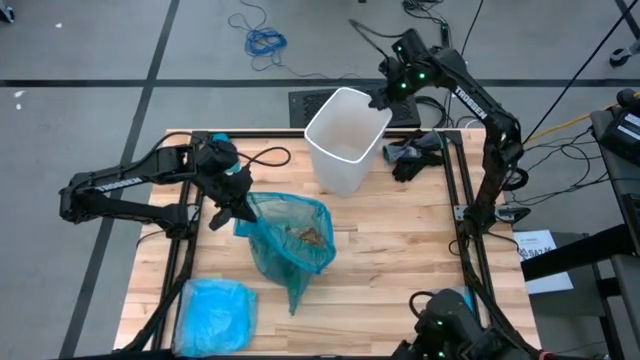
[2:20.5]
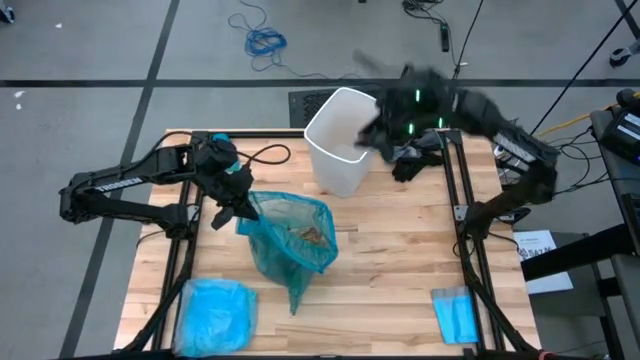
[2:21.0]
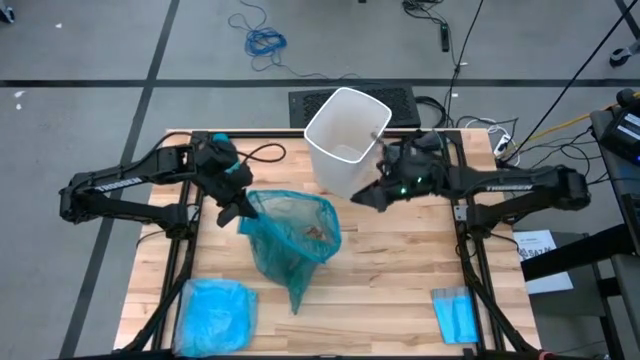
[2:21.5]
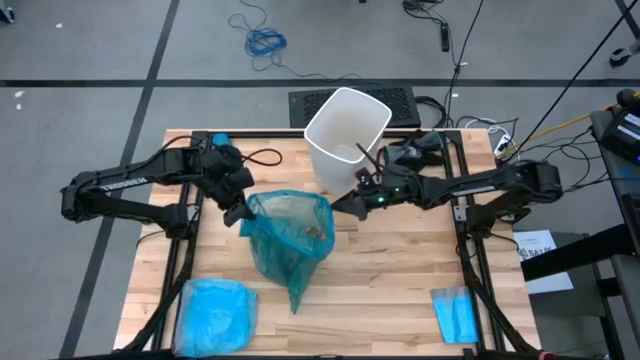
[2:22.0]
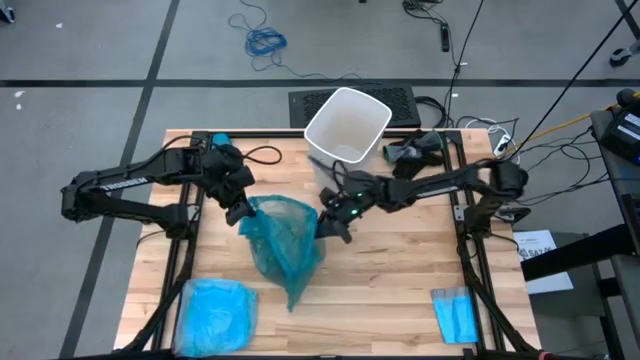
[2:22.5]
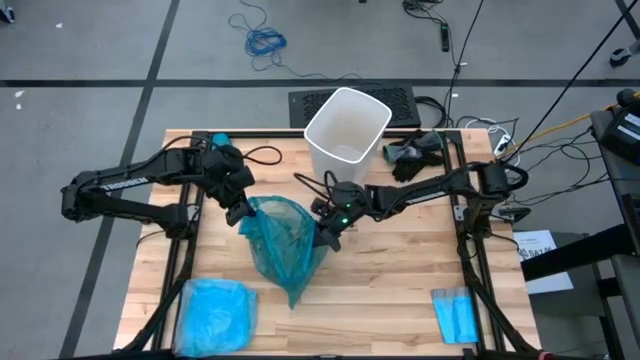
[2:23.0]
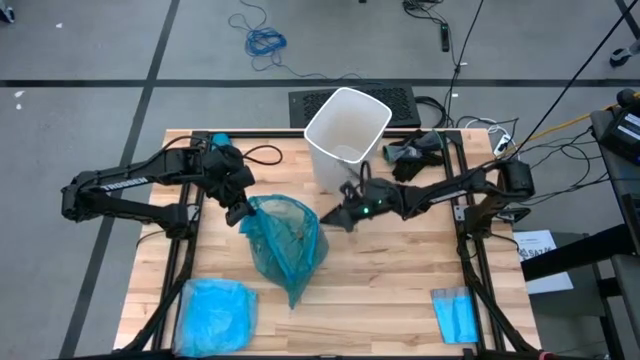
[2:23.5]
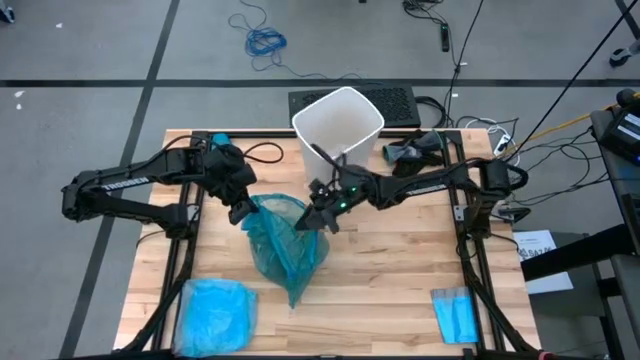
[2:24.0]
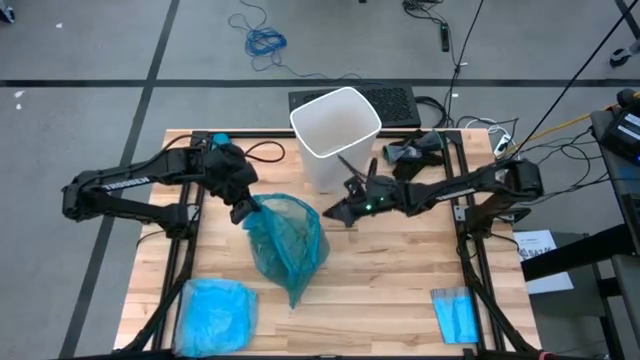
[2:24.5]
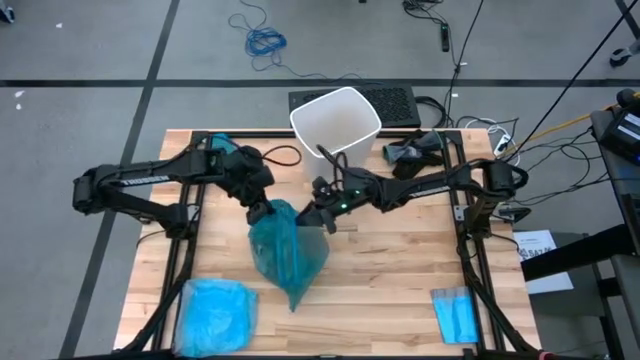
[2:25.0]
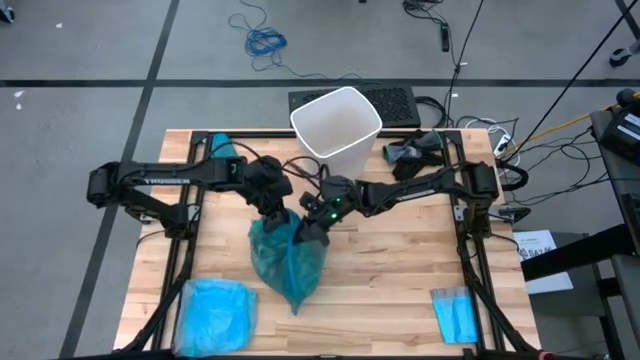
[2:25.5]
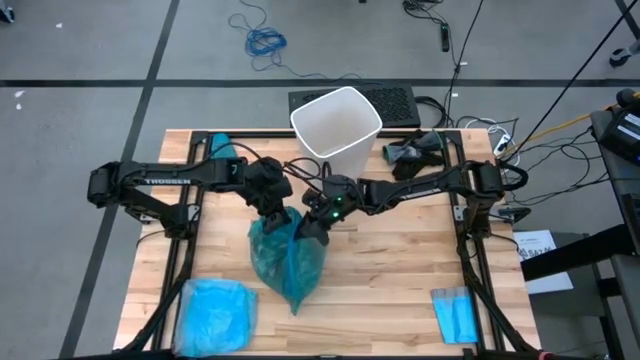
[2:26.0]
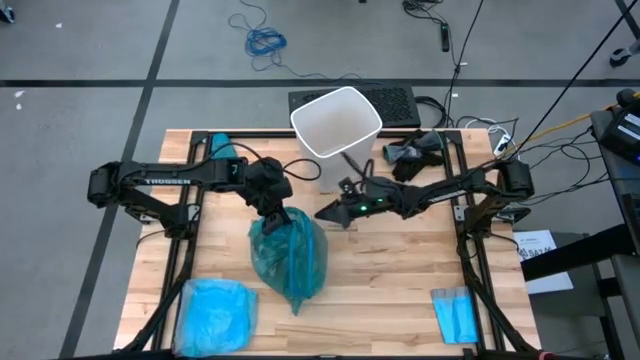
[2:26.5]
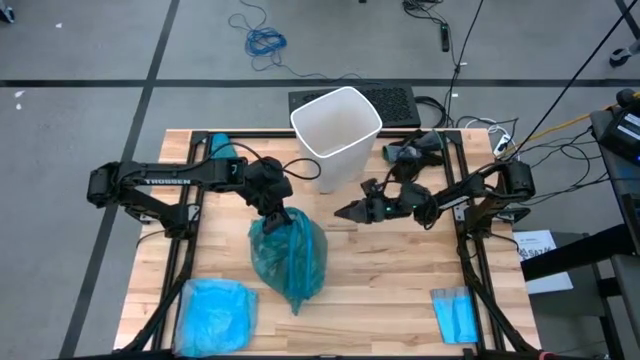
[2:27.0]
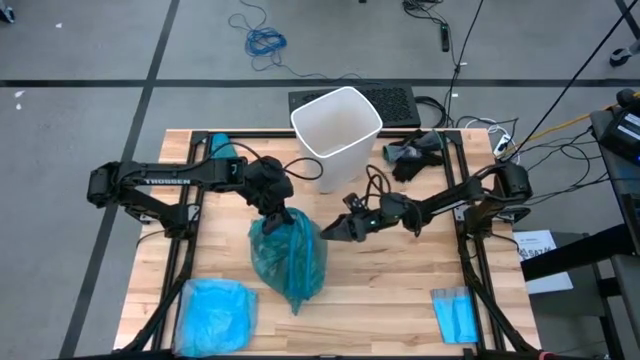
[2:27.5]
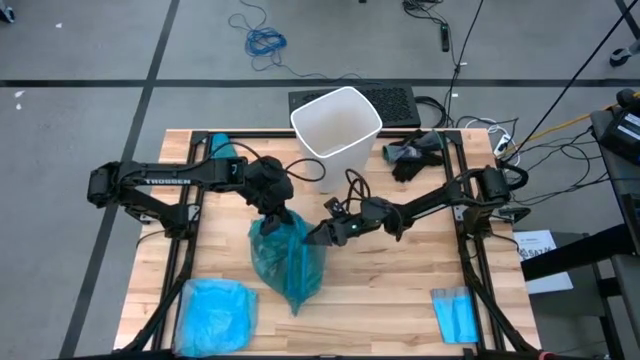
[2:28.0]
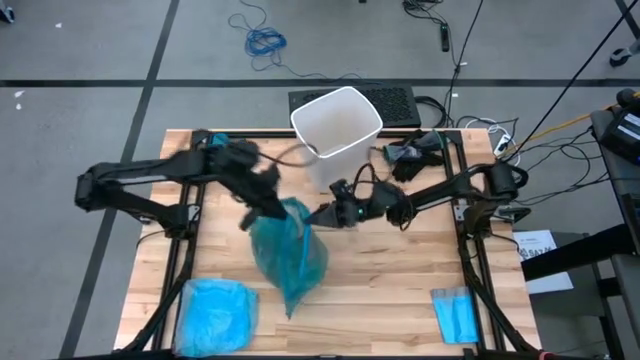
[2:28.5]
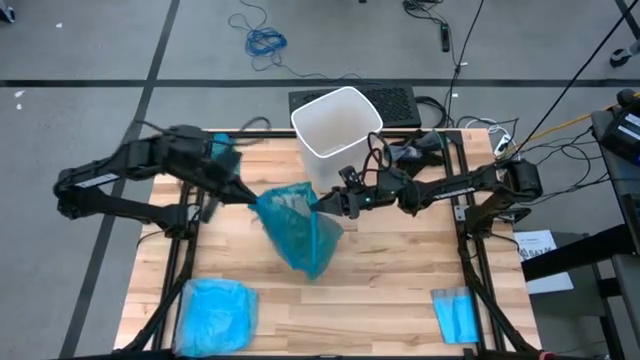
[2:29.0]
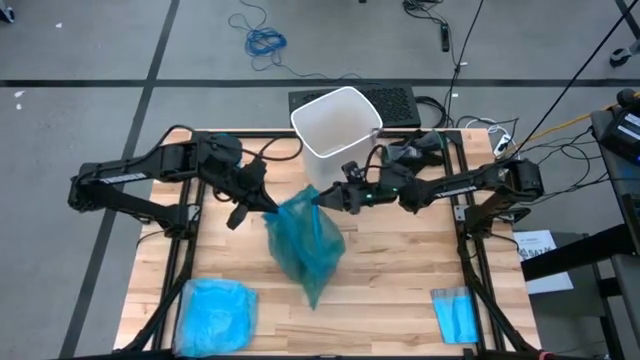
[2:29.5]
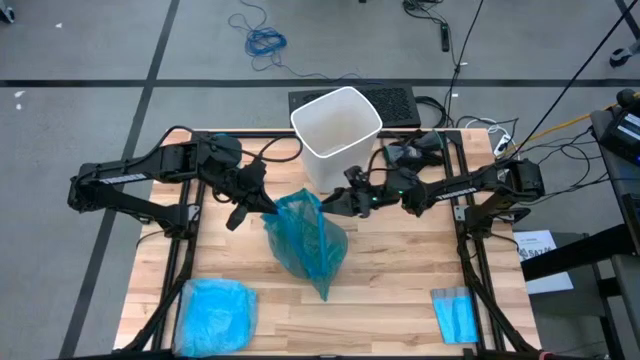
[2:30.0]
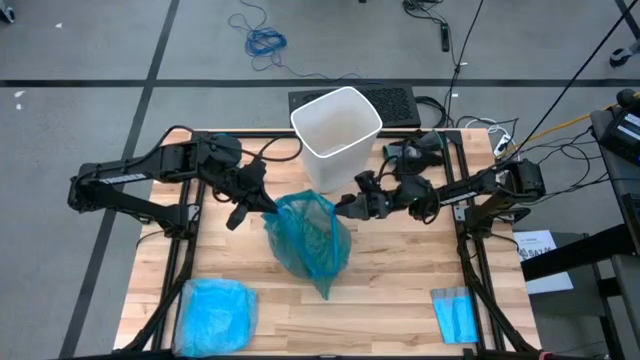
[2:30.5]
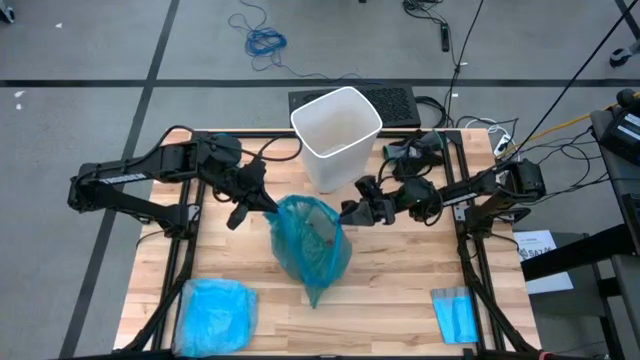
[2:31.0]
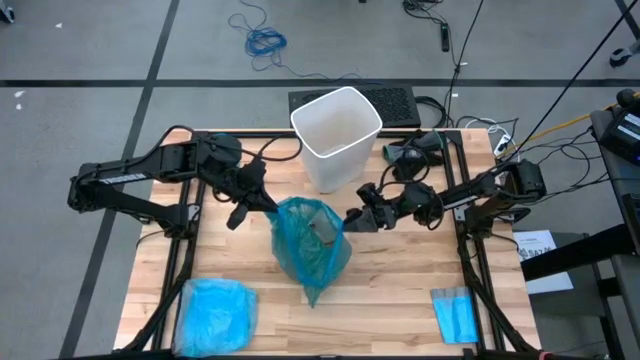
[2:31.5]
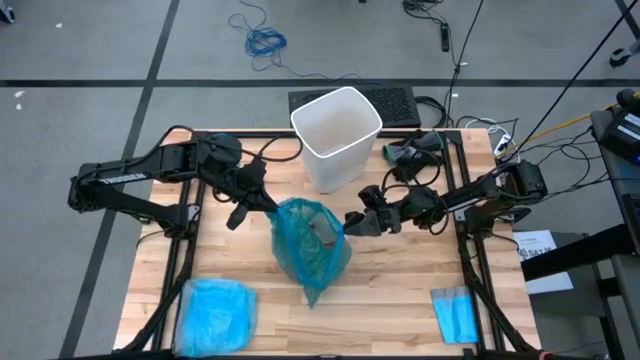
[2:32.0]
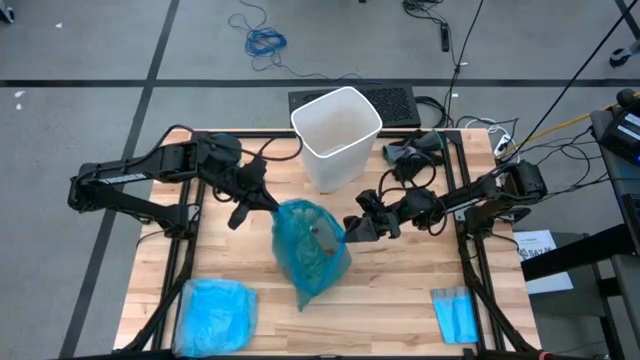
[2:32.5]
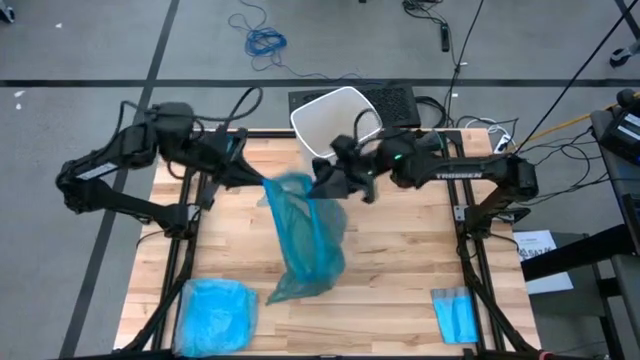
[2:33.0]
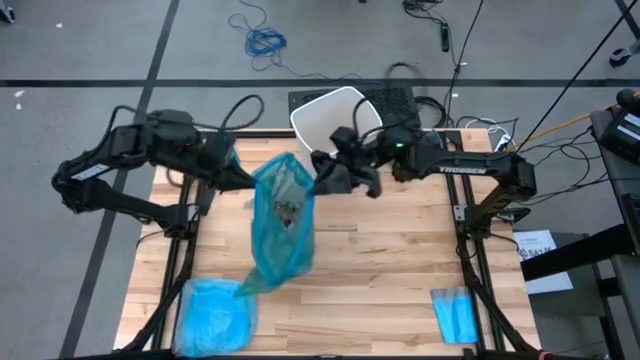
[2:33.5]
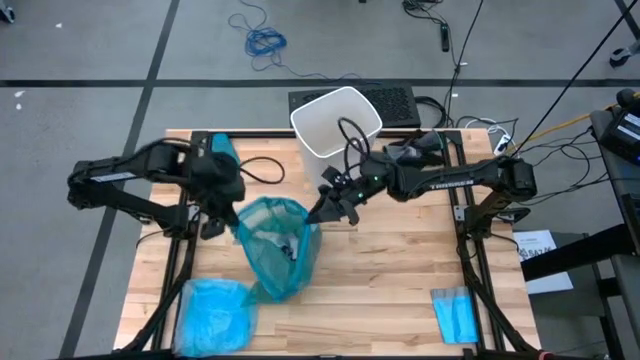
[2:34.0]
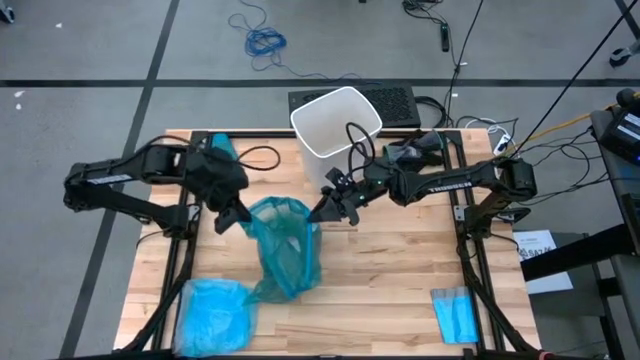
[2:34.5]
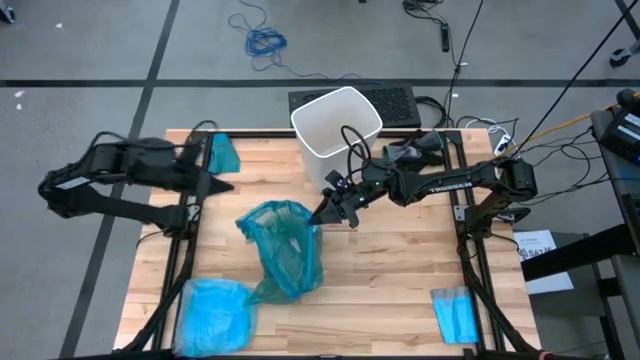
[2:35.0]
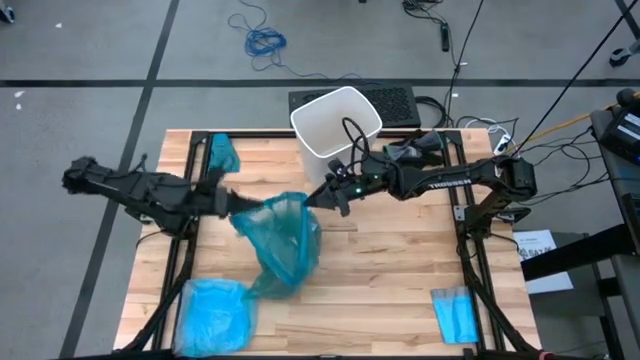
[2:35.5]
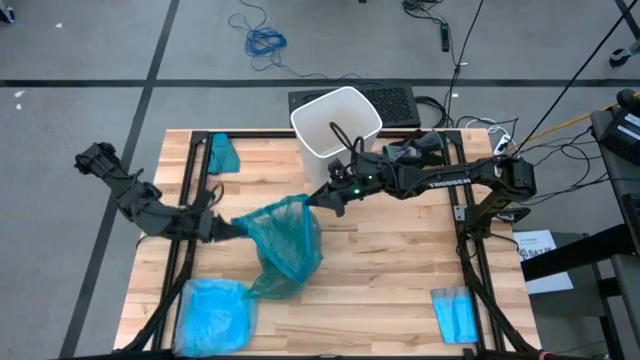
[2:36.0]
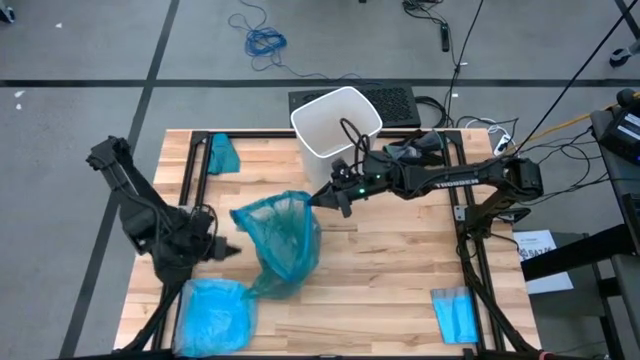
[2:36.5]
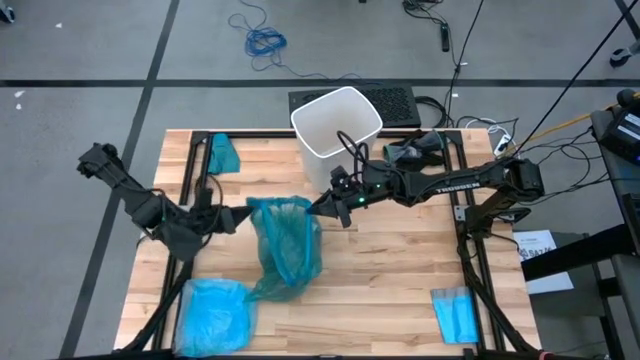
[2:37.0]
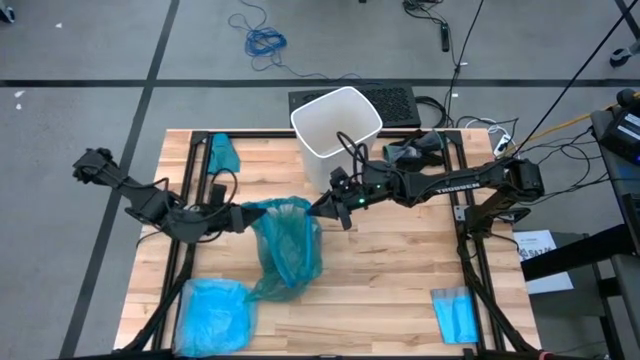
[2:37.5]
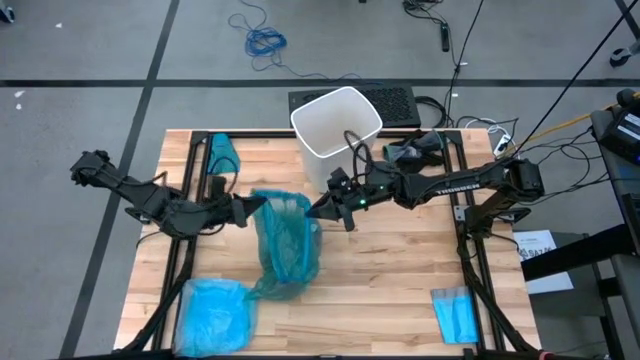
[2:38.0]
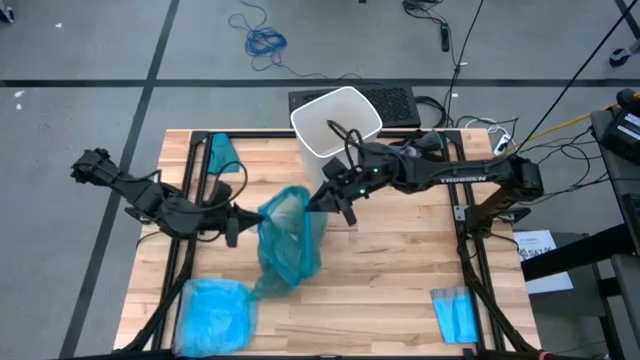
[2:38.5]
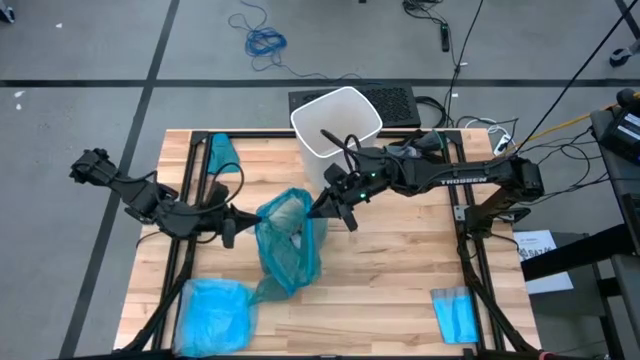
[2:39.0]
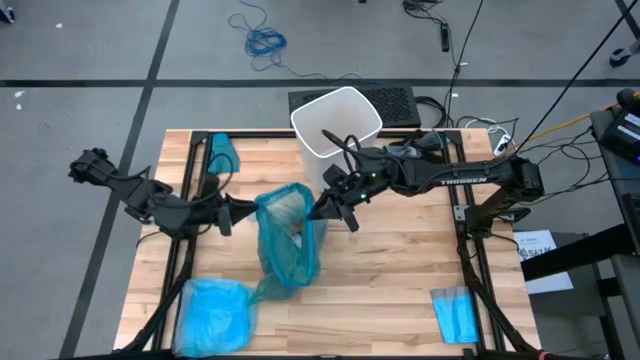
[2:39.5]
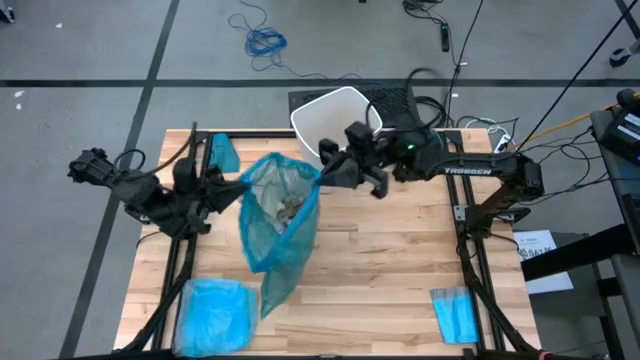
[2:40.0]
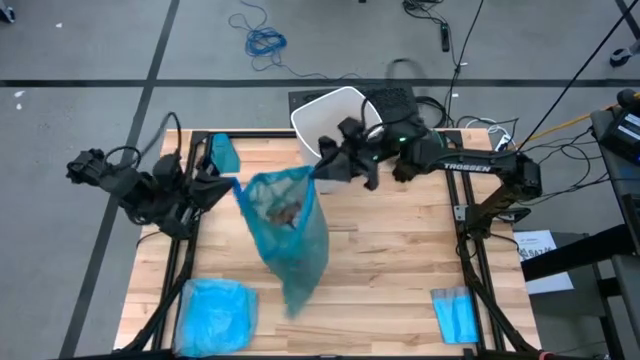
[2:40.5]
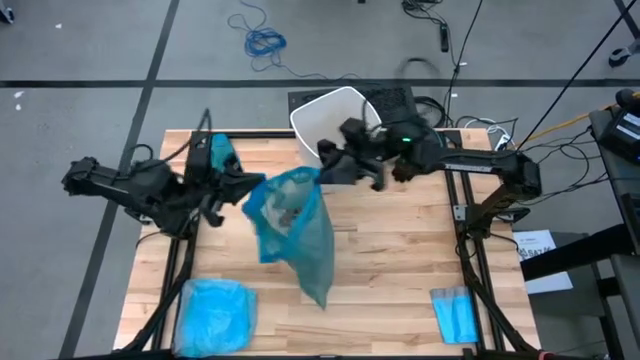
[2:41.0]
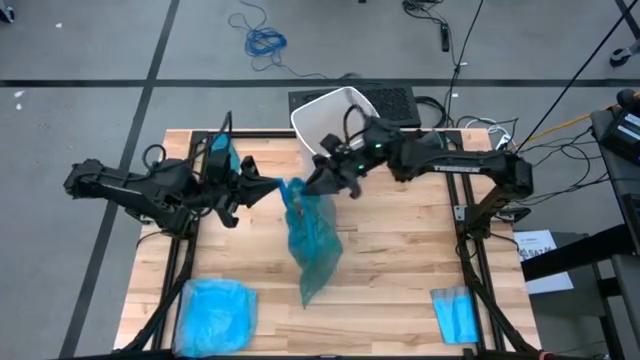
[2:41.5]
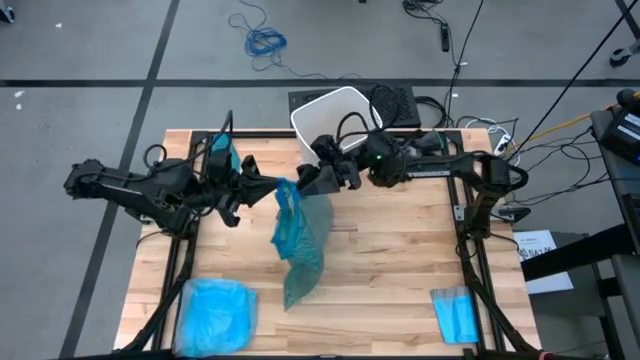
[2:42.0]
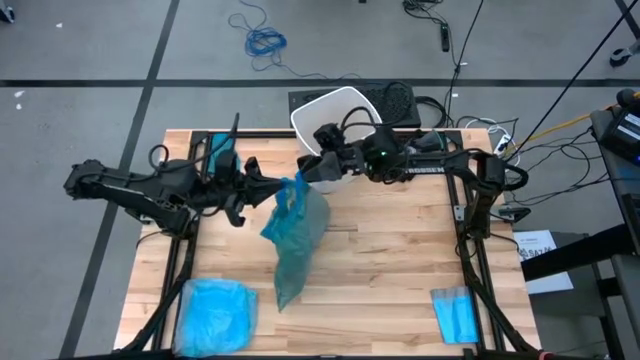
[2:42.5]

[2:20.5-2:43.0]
Task: place trash/remove bag and relplace
Close the blue trash bag
